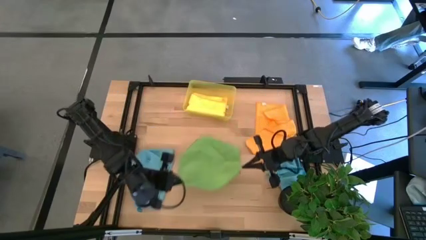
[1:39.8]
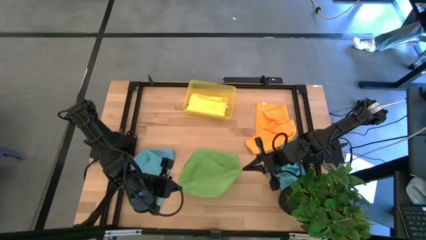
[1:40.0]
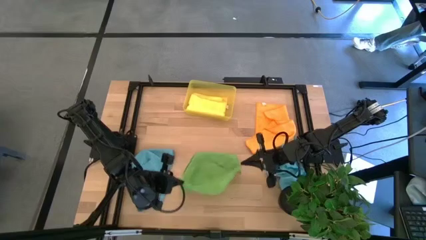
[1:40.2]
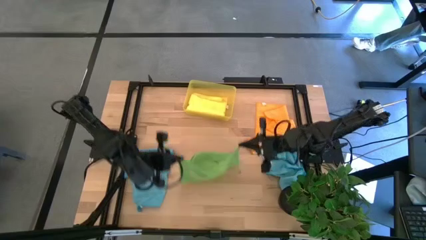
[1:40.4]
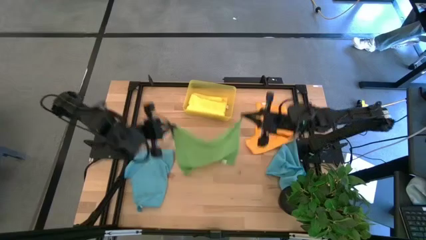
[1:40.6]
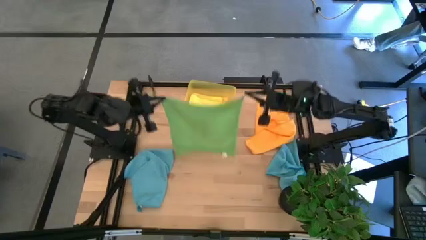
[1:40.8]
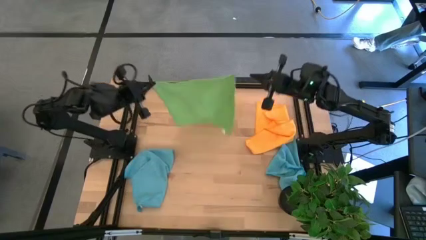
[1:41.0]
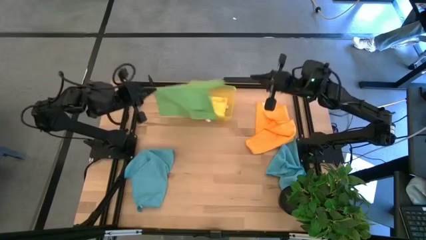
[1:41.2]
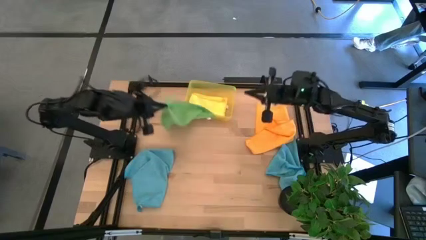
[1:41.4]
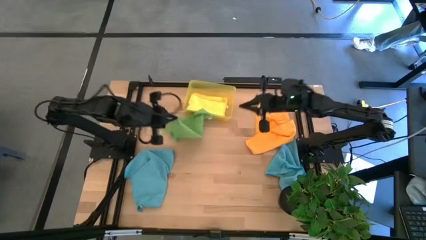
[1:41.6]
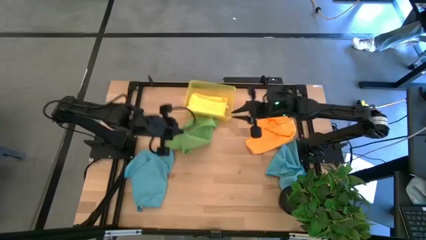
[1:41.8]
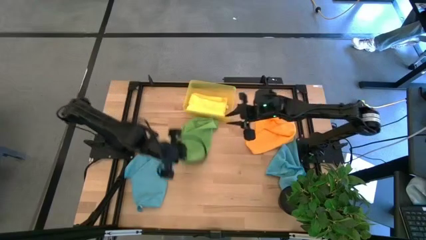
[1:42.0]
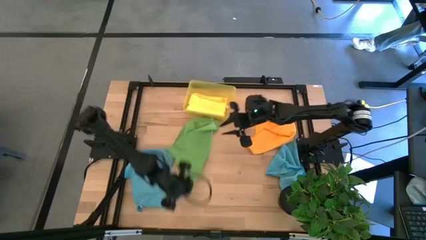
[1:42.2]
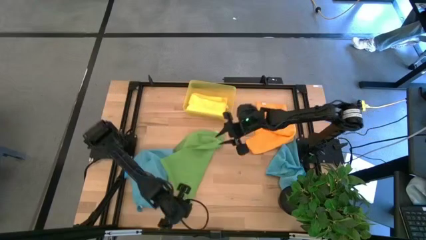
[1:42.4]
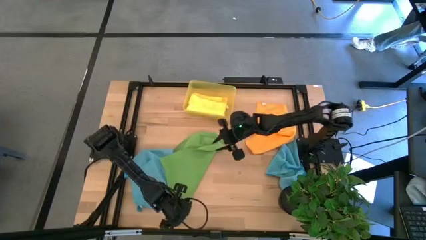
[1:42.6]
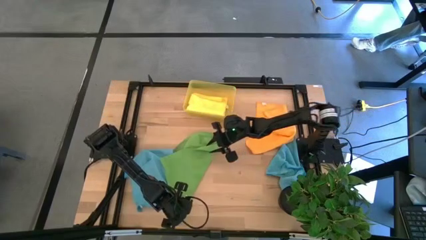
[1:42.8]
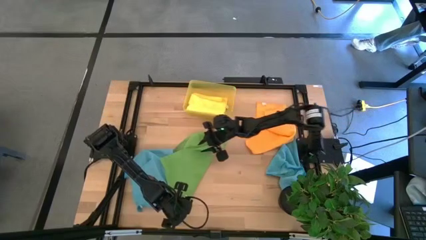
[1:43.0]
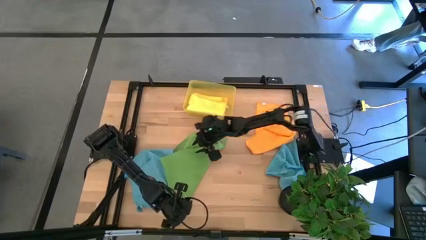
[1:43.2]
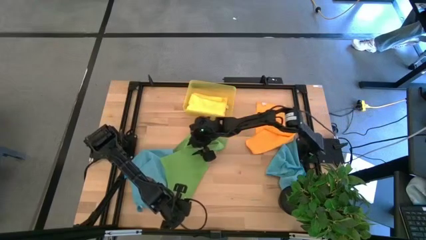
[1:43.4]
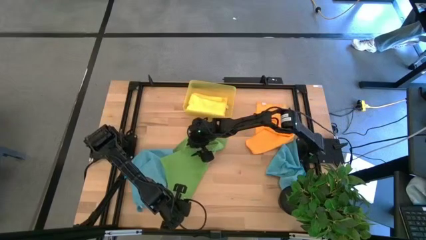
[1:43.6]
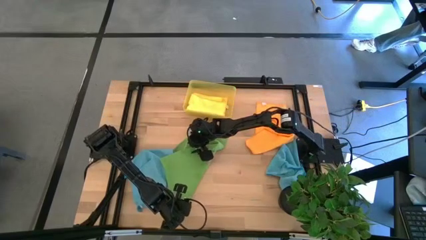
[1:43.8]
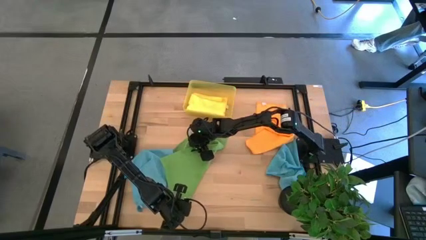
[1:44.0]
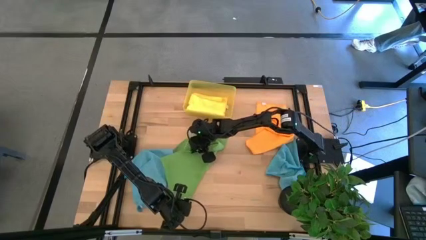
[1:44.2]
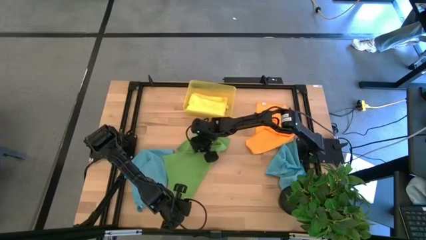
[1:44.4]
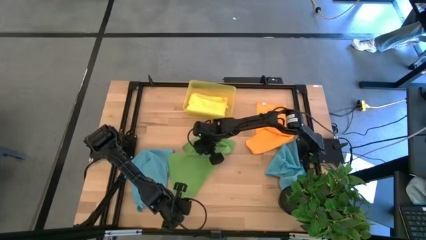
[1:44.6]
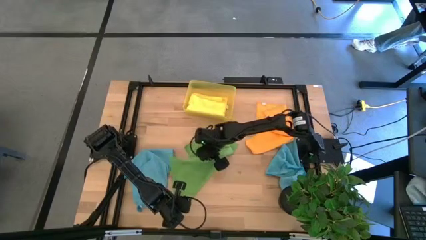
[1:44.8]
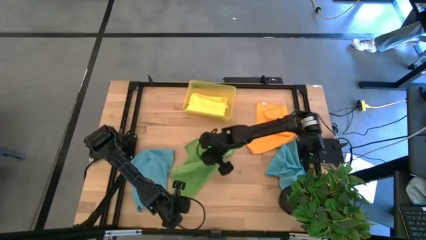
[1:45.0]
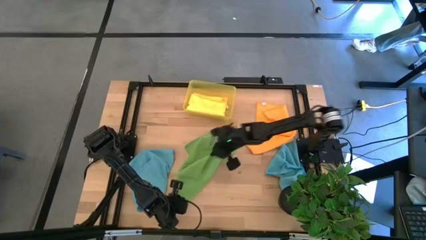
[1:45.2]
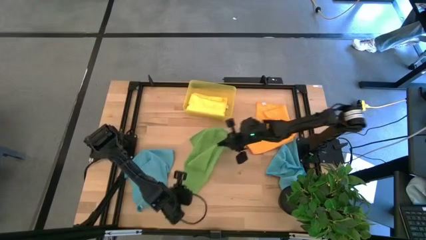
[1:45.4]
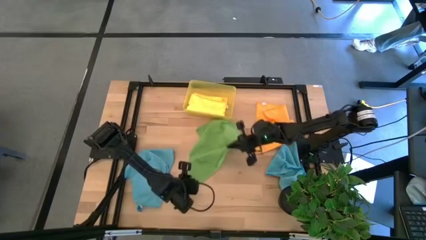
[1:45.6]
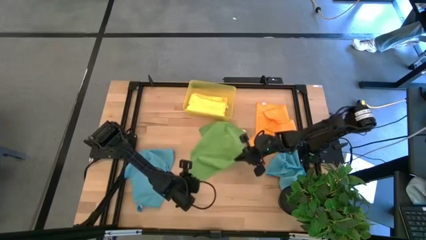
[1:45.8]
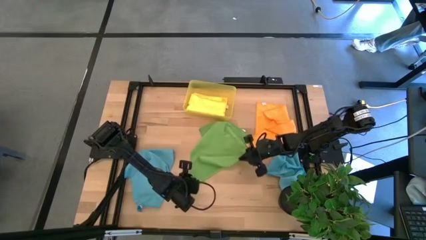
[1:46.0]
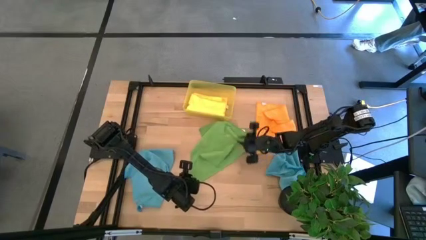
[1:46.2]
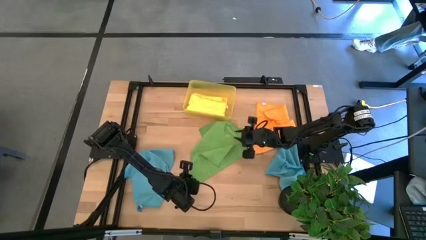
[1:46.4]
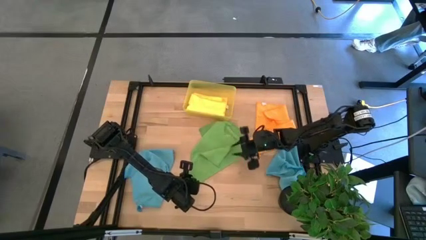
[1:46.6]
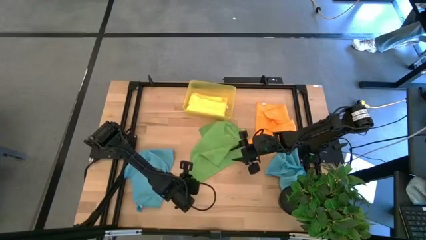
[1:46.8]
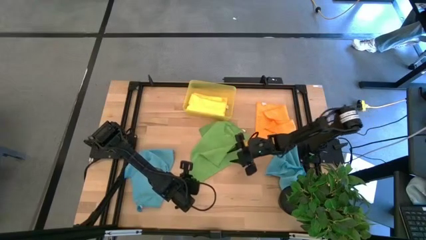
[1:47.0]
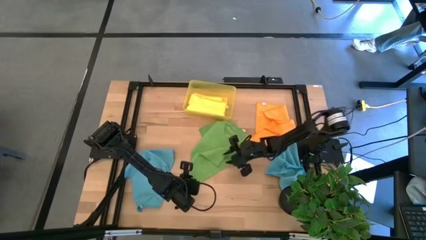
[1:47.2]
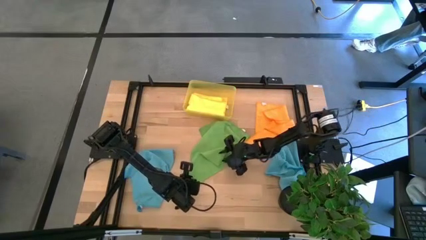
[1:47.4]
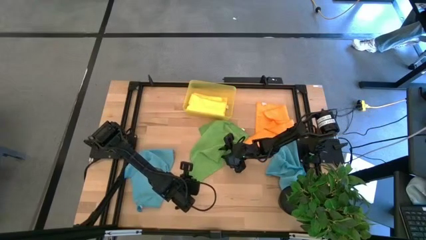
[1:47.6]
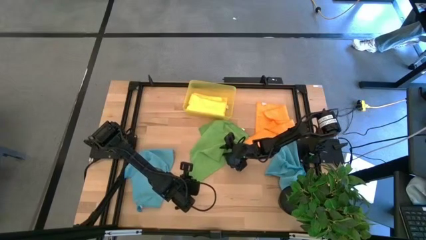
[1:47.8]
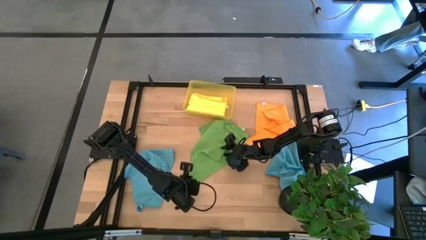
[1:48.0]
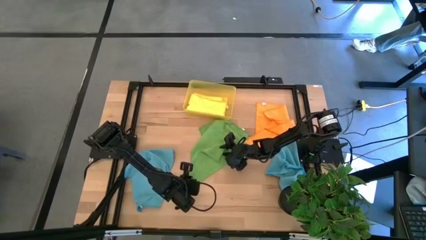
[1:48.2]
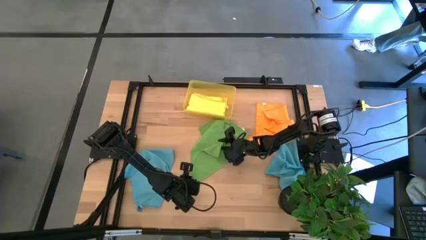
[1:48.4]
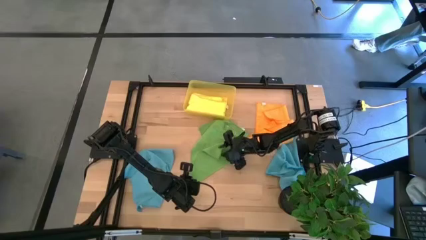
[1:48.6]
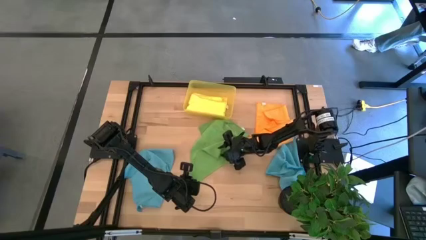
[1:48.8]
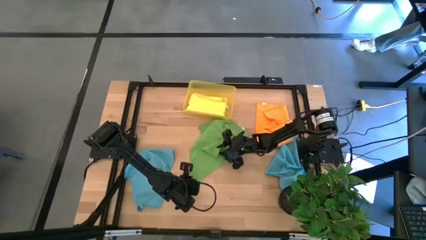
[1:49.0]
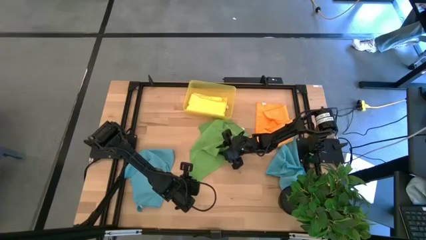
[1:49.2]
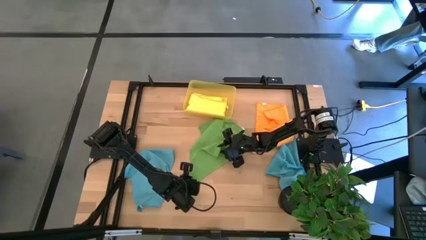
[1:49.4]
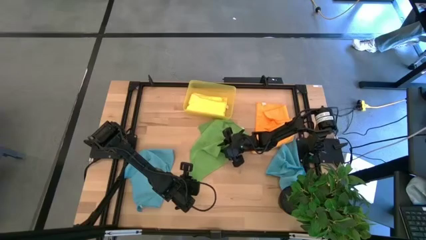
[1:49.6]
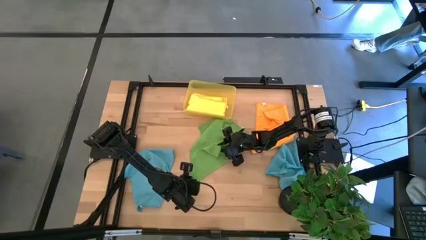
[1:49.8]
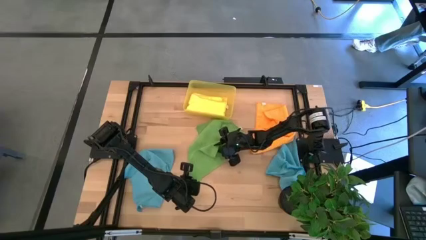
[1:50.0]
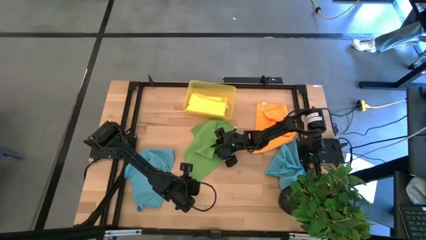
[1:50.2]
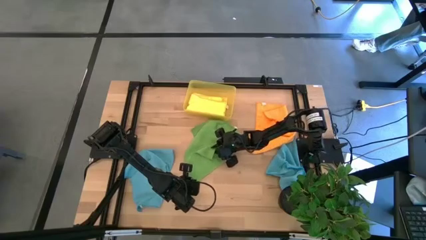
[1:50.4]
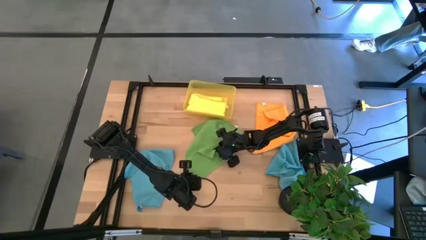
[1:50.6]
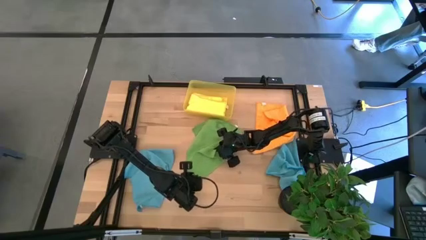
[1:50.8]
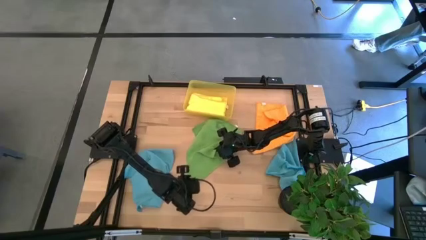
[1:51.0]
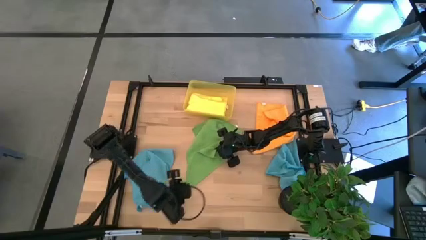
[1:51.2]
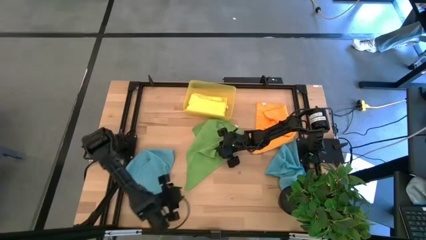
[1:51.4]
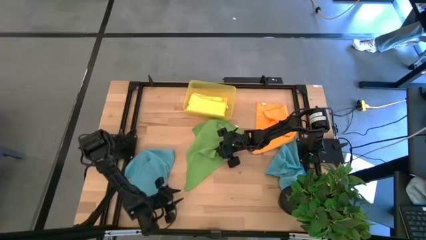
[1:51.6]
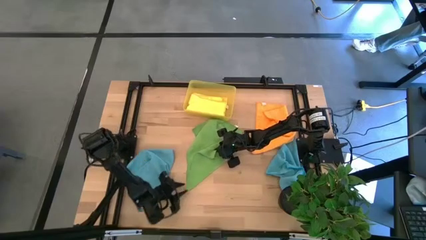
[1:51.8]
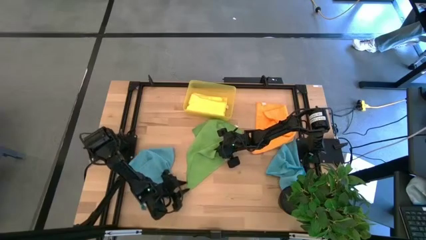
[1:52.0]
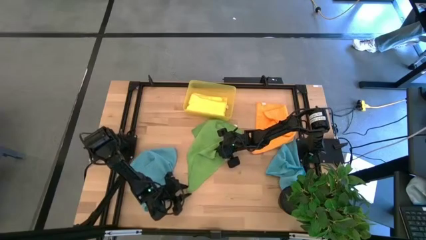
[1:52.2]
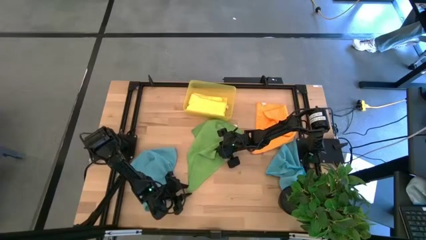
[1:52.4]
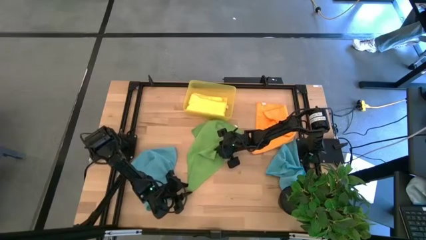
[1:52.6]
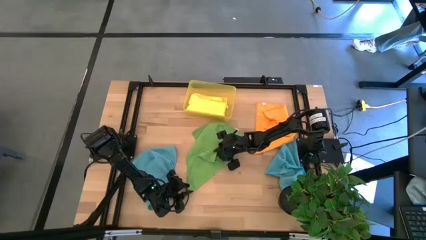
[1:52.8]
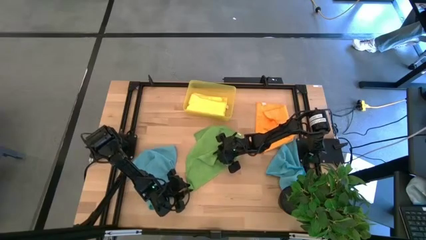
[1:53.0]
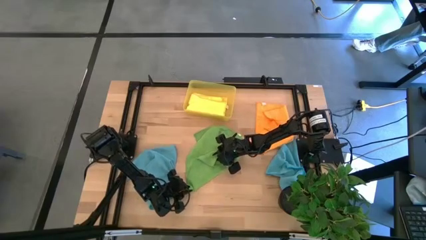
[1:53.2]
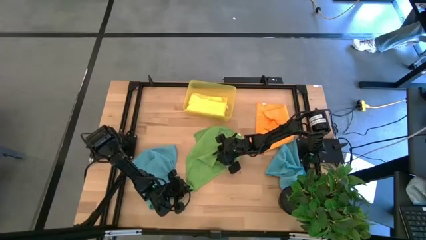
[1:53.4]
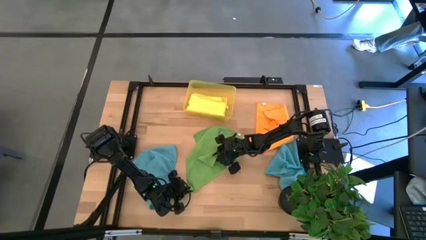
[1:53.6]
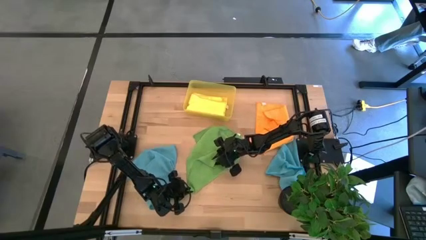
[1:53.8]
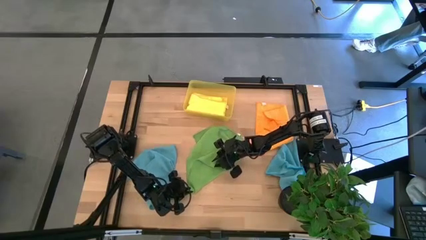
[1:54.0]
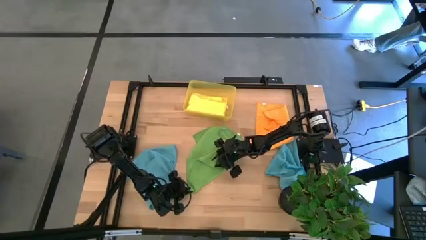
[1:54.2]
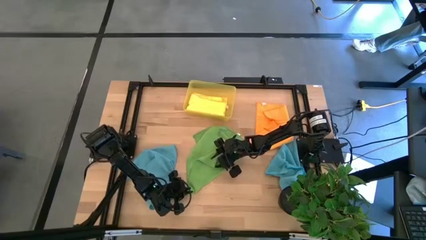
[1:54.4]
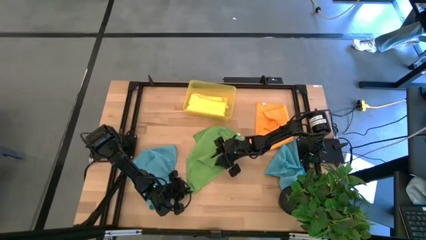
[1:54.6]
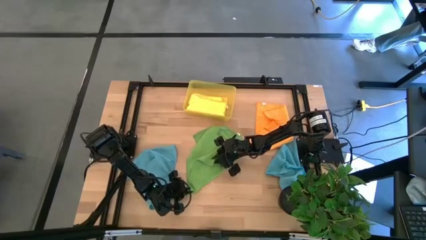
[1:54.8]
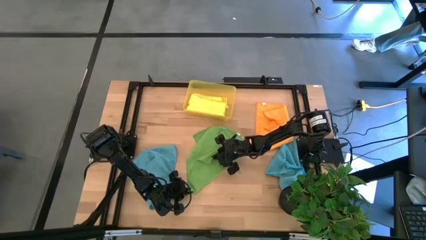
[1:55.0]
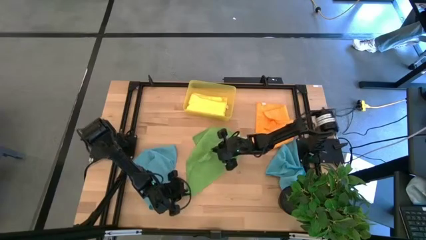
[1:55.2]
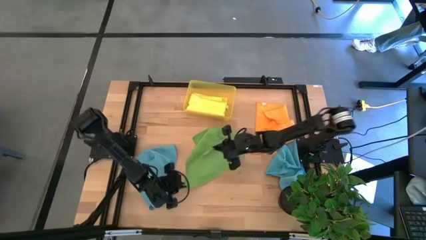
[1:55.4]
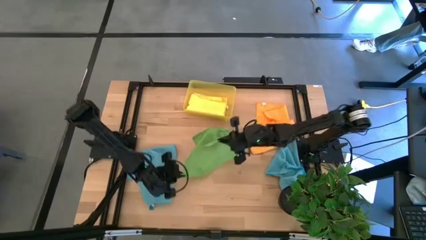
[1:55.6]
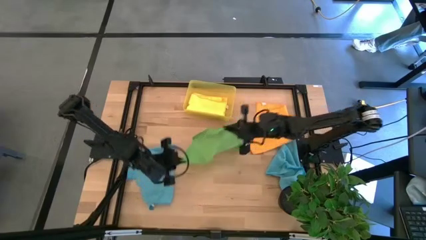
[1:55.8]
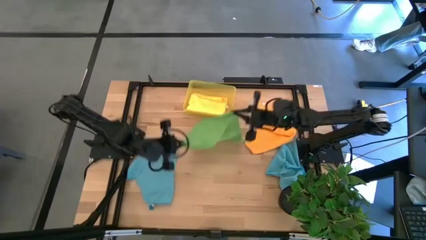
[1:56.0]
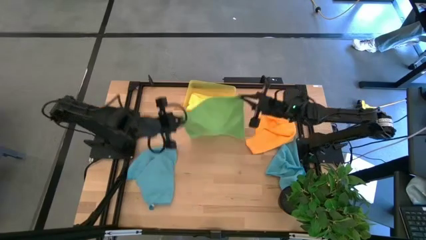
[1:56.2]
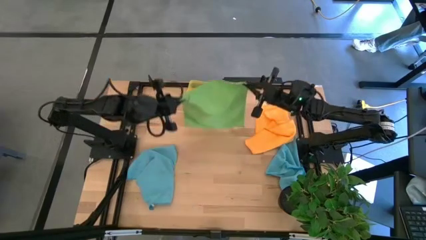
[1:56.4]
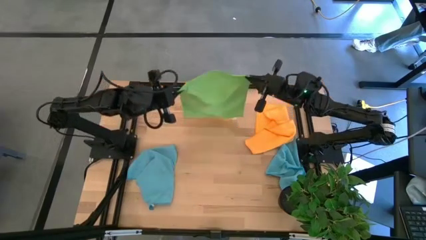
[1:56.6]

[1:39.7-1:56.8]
Task: Fold microfiber towels
Fold the green towel
